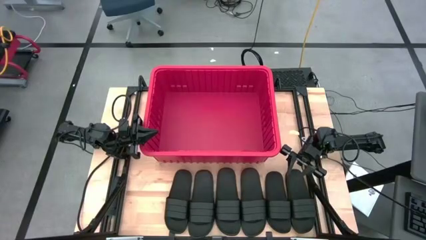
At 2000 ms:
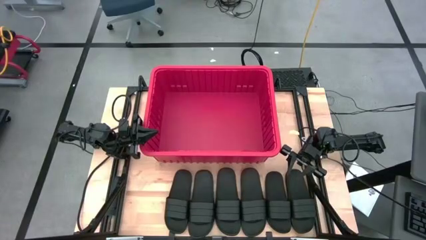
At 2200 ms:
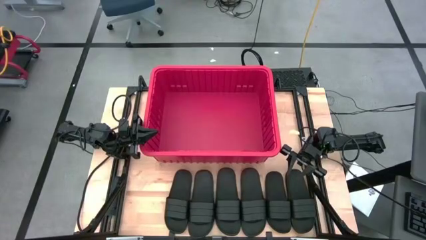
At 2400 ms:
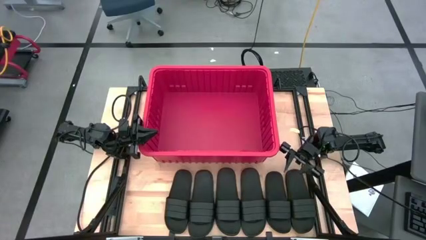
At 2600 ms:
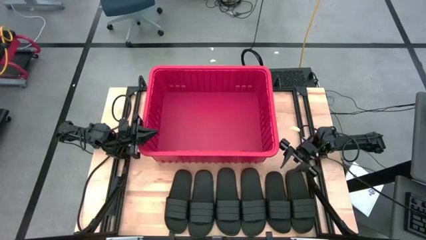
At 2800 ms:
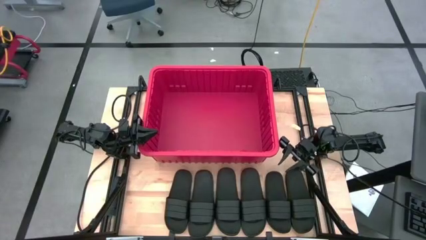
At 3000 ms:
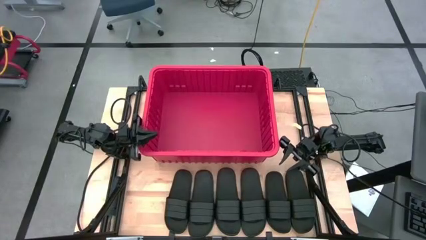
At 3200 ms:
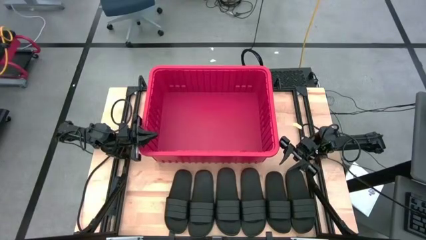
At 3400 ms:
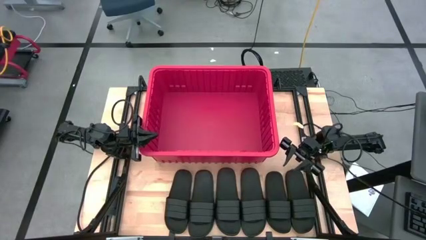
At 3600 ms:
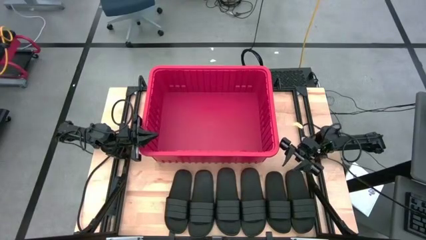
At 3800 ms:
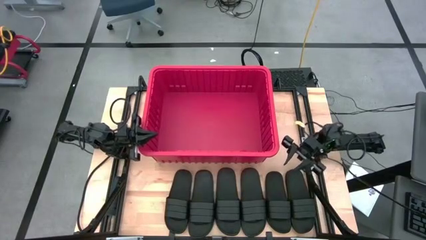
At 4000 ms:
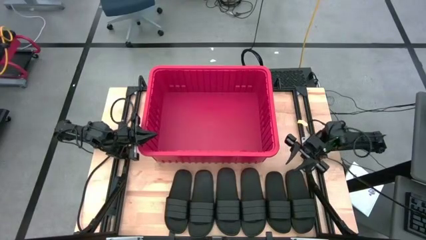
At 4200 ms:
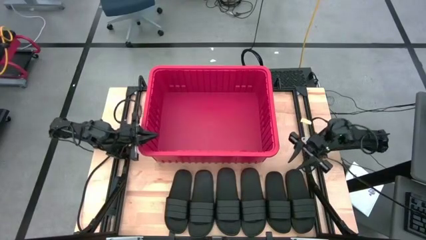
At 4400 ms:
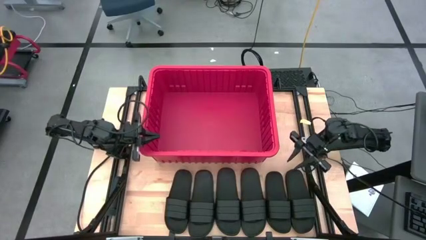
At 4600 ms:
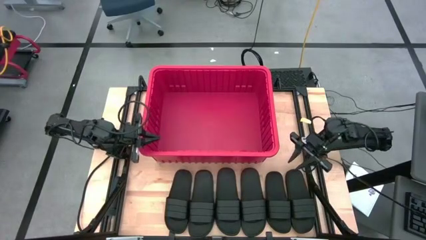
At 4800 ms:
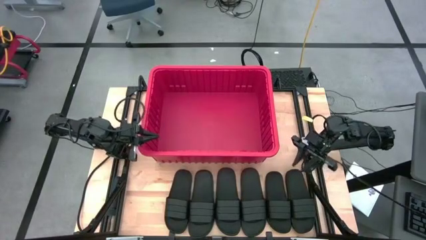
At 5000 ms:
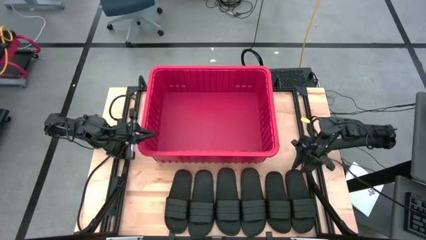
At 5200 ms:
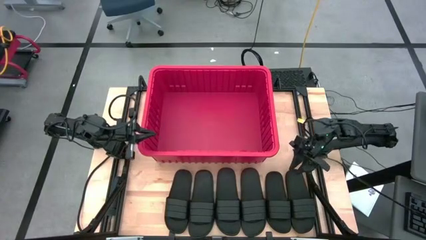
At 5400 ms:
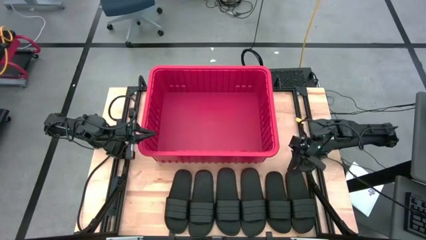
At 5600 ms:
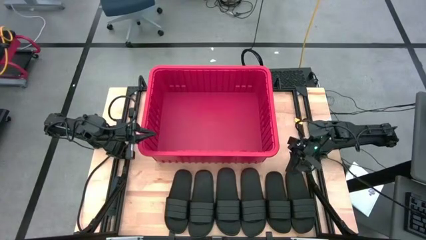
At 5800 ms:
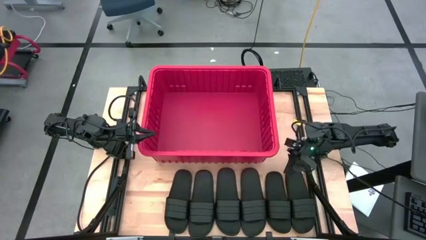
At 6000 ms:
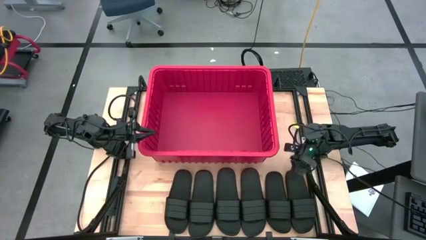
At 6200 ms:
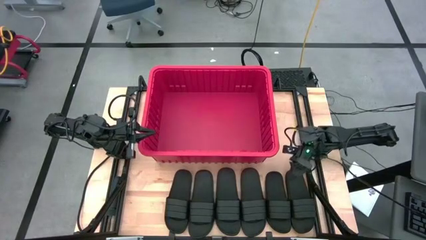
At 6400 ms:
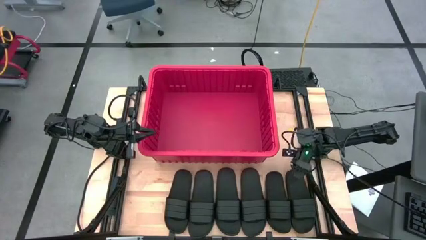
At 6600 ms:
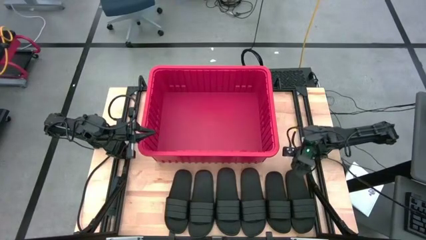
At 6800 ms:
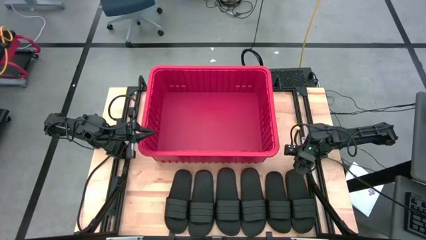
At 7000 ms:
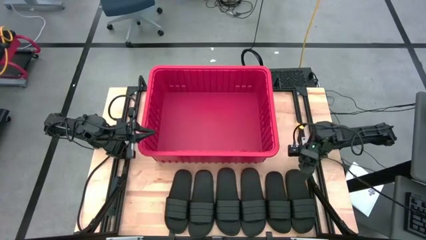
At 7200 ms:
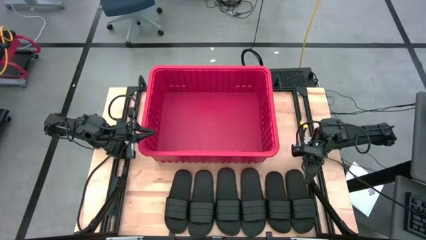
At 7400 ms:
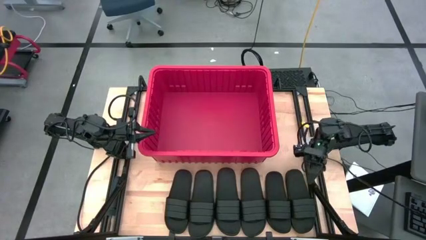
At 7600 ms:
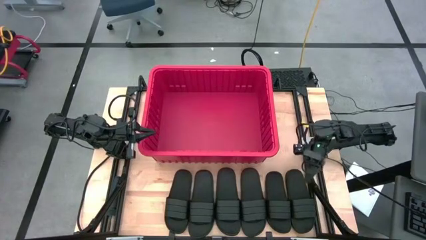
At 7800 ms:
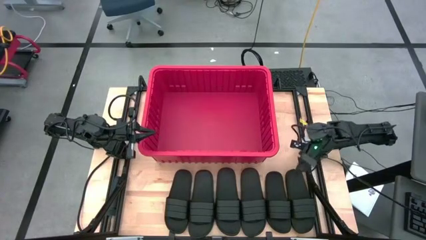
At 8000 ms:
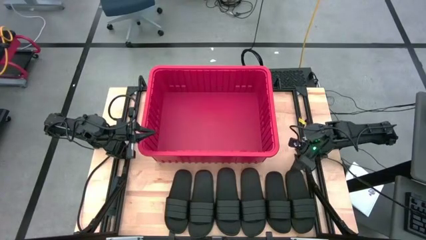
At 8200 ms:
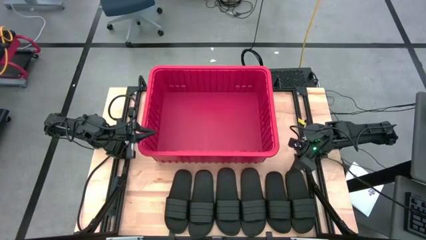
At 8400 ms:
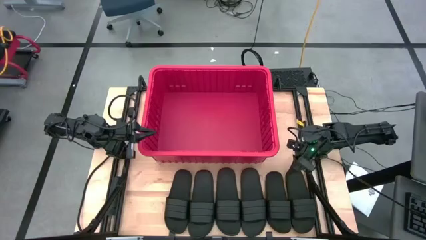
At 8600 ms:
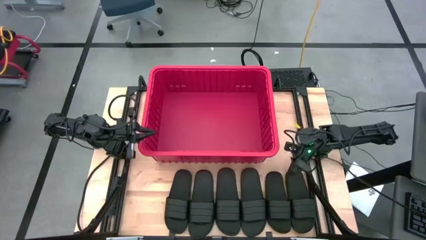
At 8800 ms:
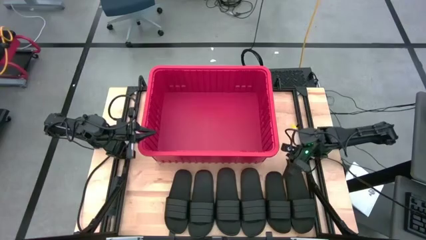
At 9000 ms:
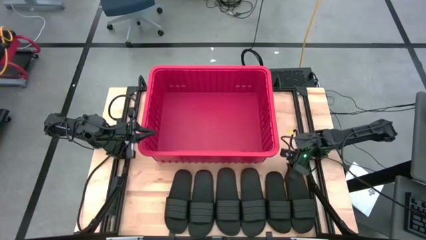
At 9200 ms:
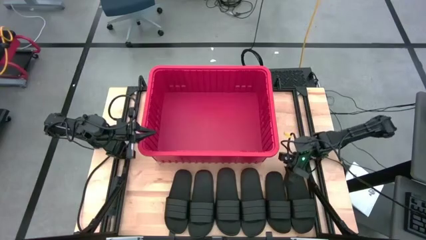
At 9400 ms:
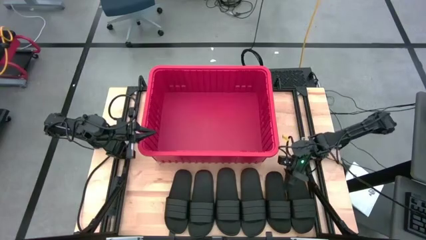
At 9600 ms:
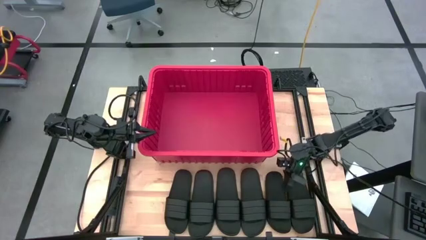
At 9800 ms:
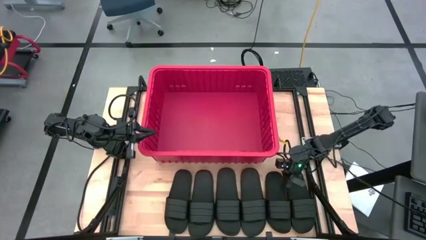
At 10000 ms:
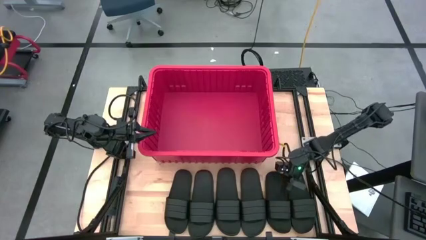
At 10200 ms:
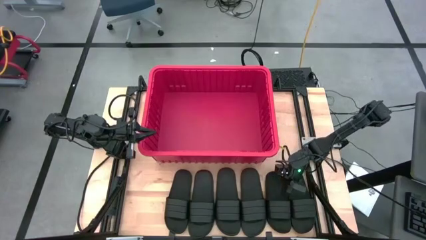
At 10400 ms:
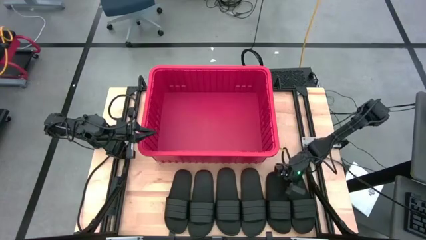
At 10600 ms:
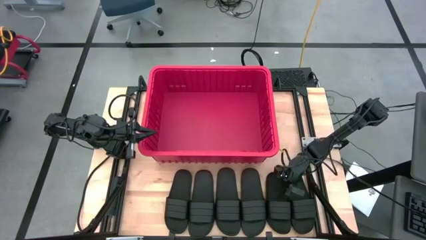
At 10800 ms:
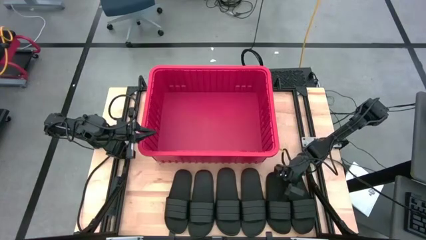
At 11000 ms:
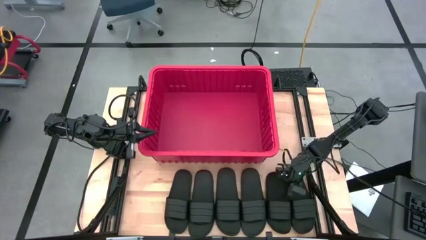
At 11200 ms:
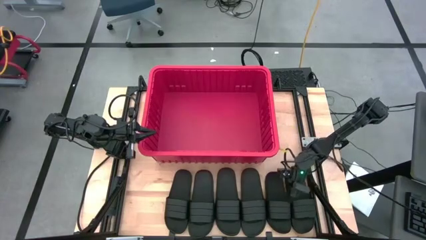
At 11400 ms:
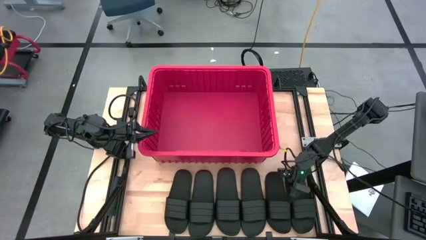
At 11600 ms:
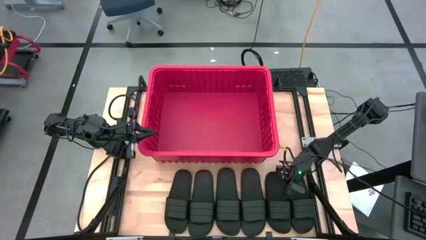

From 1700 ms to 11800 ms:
Task: Pick and place slides into bin
Put the black slide into the red bin
